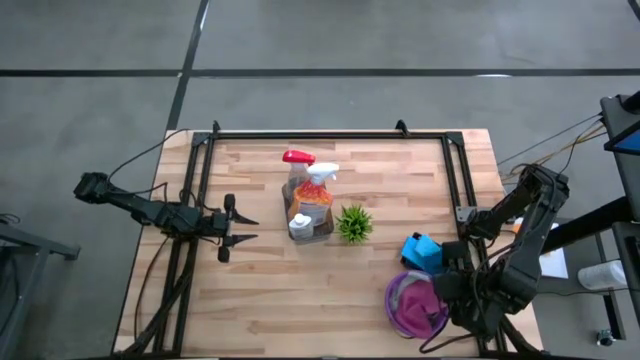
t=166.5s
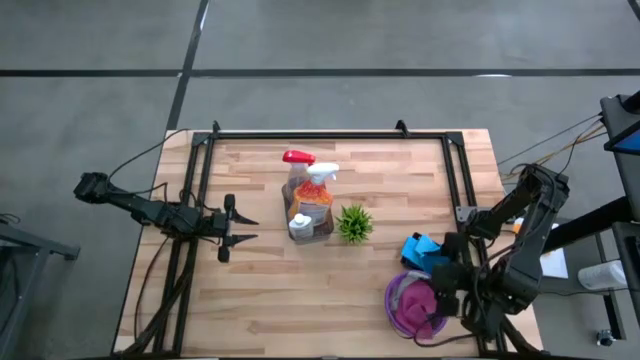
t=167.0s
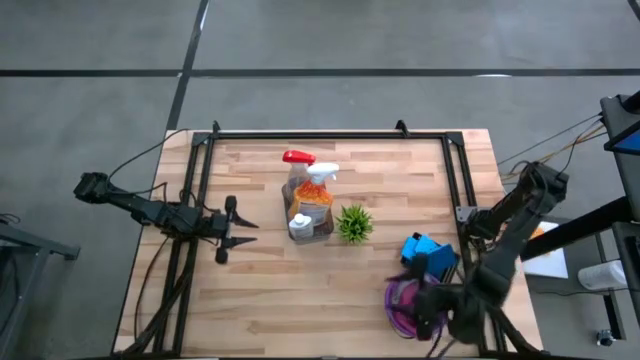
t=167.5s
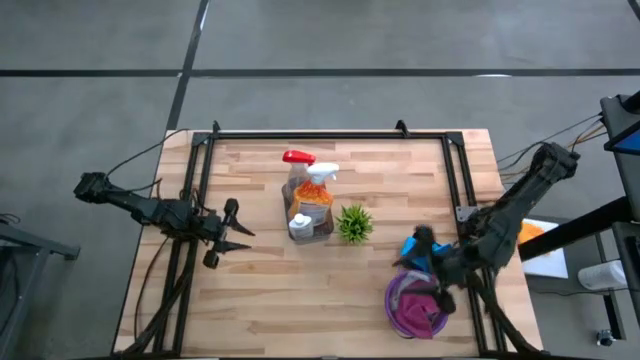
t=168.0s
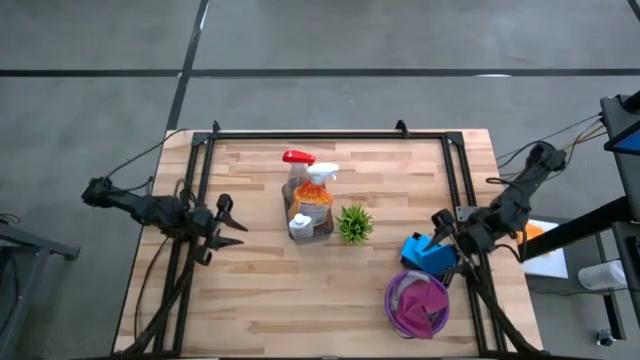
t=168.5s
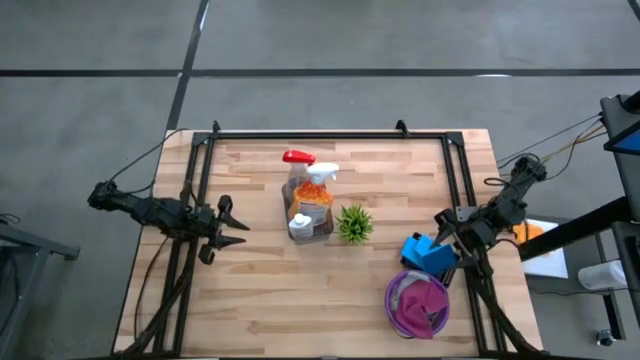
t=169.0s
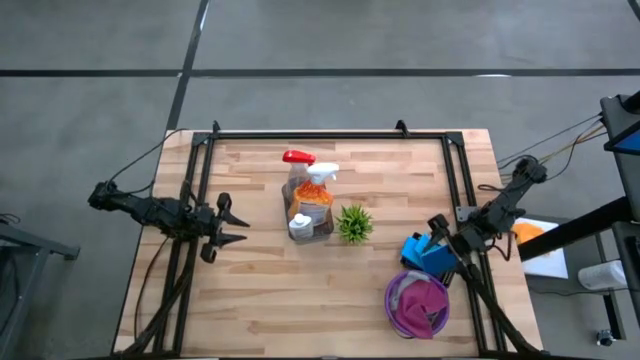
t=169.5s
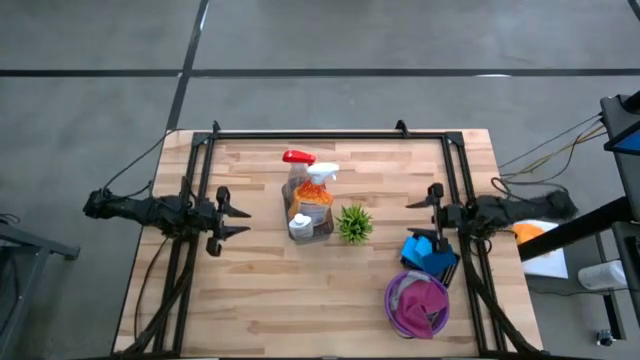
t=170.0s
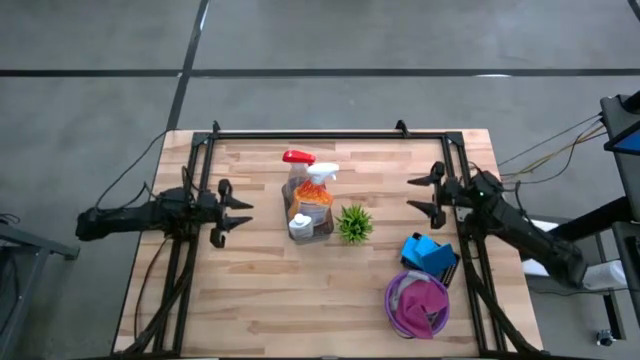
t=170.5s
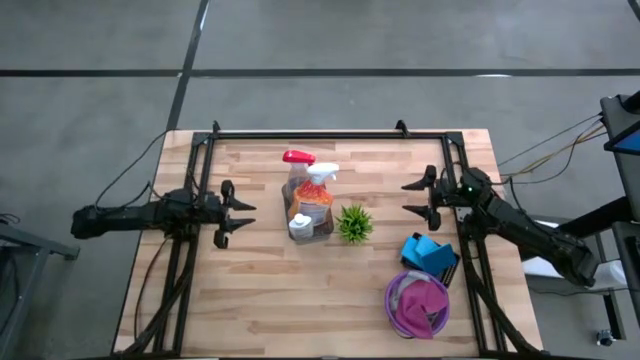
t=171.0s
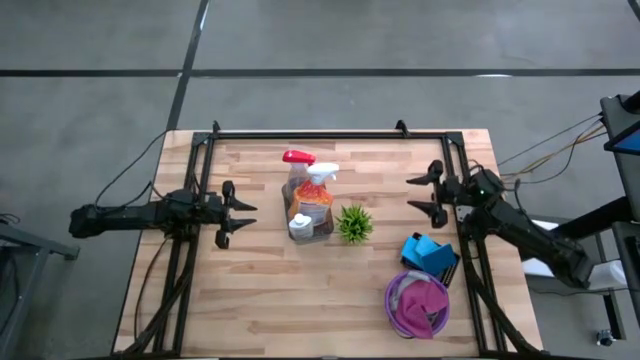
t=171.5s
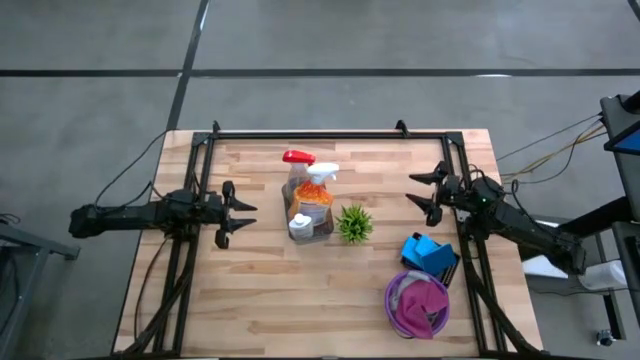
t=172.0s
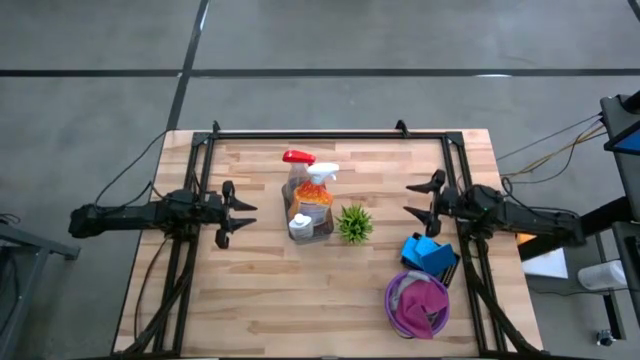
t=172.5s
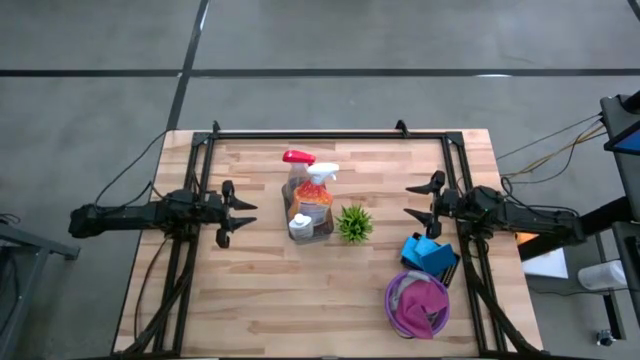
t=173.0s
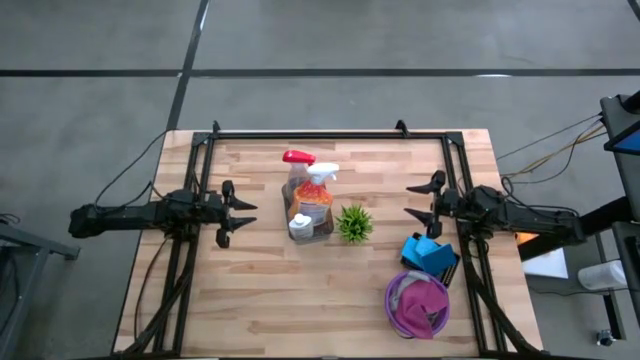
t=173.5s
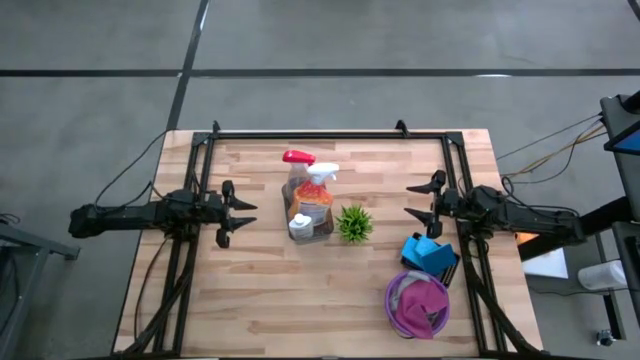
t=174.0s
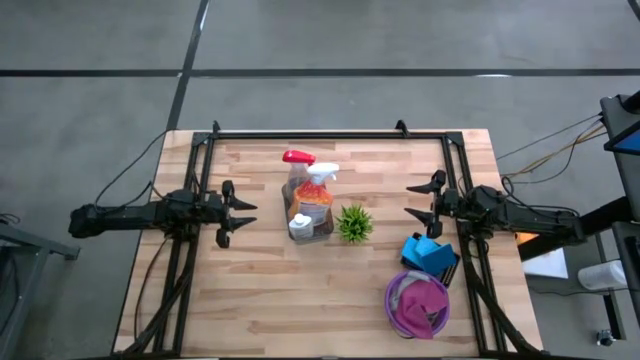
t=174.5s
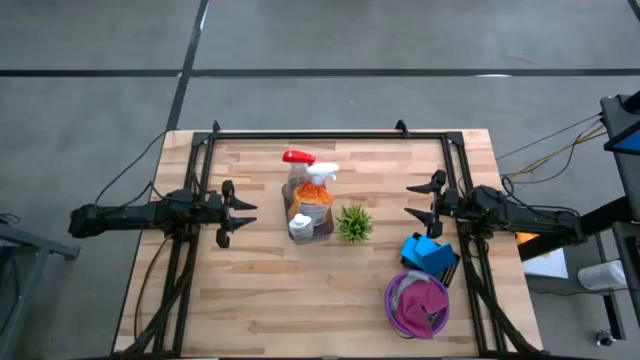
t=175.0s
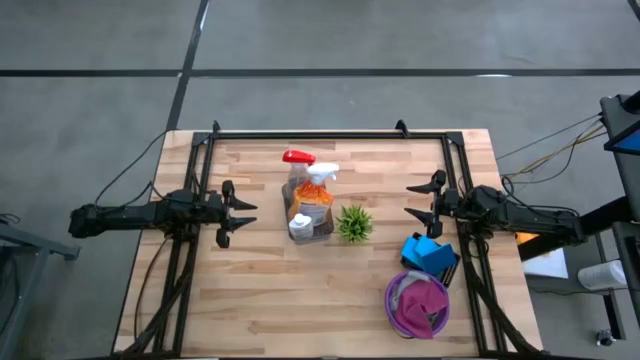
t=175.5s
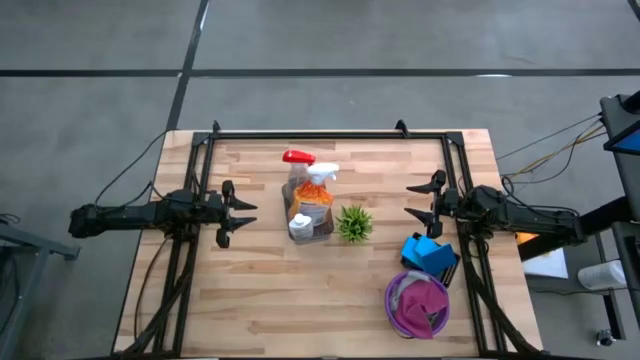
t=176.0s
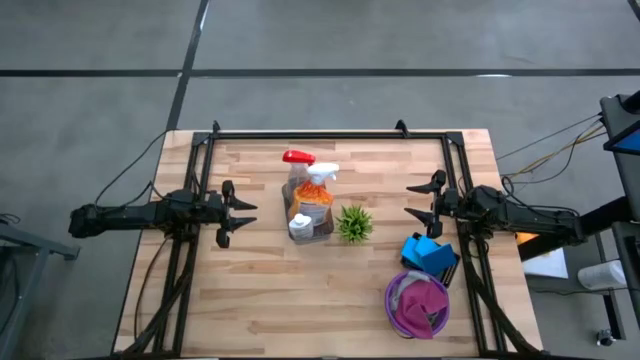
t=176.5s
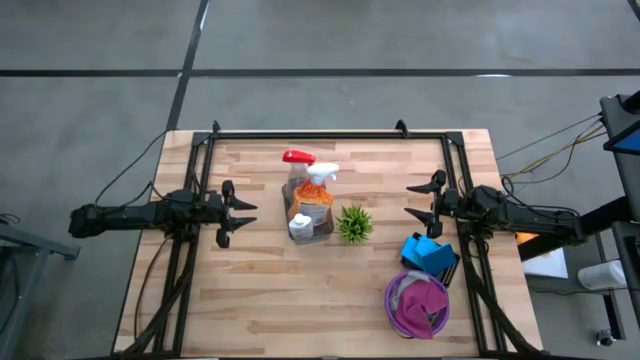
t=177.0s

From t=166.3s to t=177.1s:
Task: Pick & Place Kitchen Items
Return to Home Position
